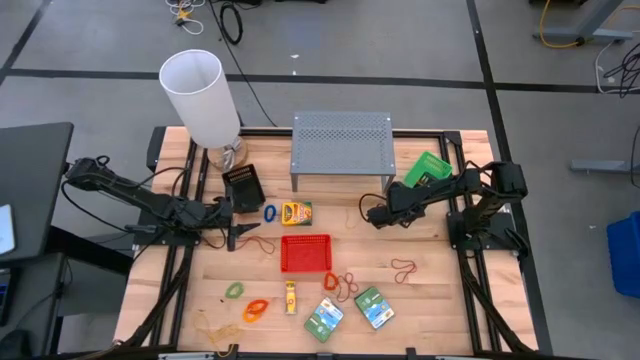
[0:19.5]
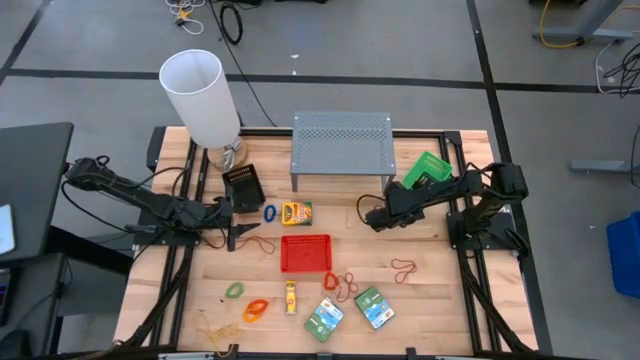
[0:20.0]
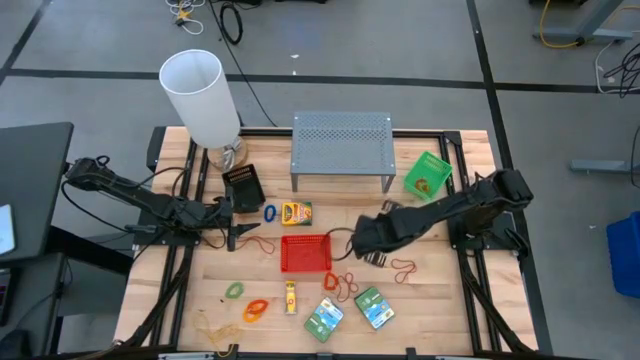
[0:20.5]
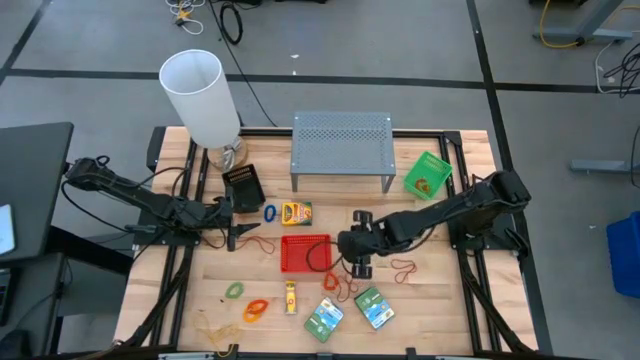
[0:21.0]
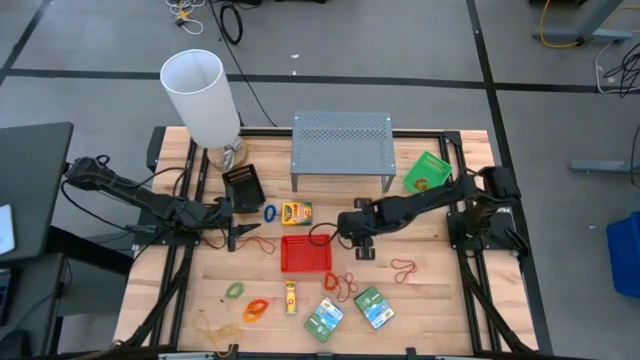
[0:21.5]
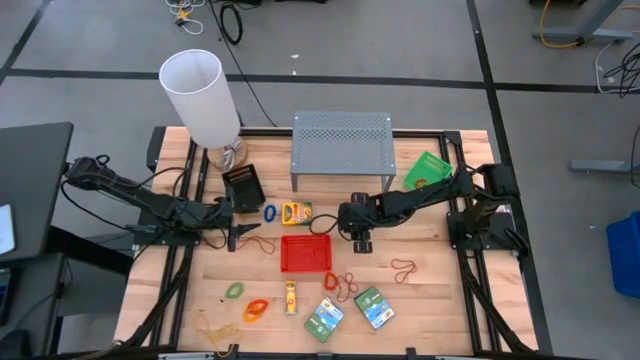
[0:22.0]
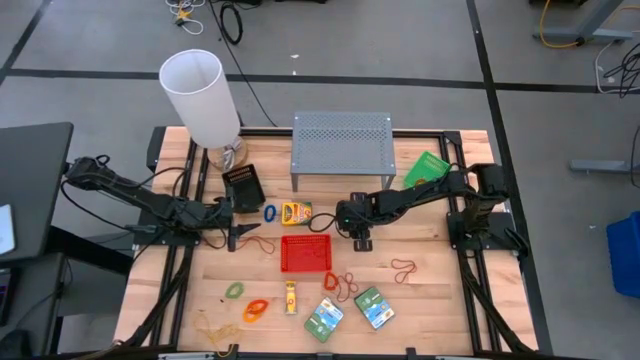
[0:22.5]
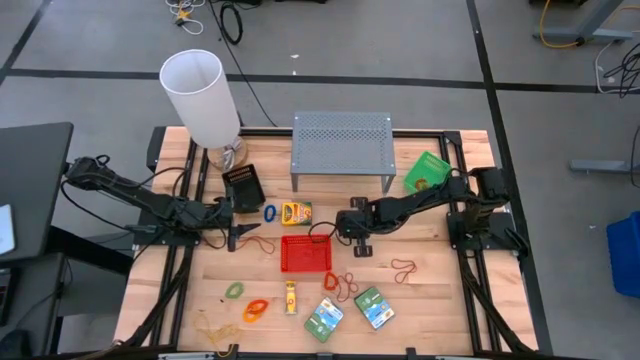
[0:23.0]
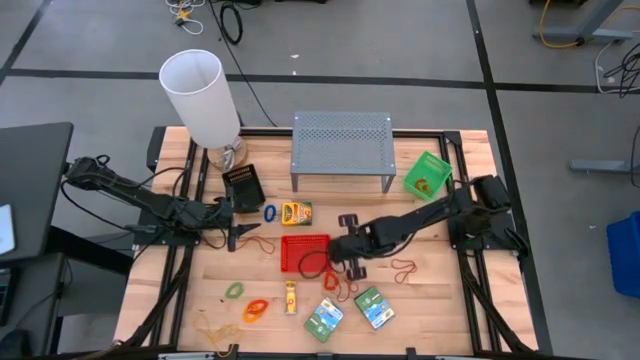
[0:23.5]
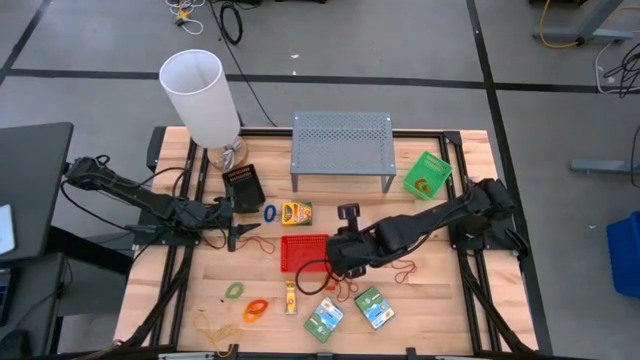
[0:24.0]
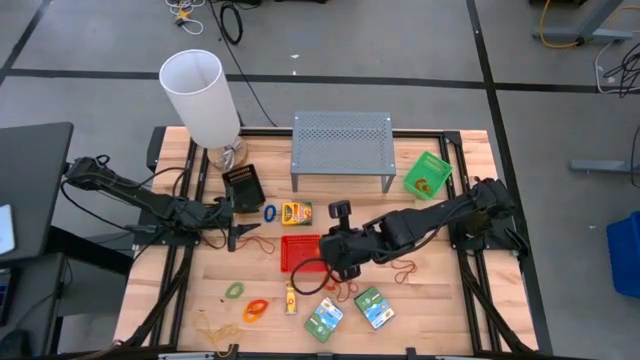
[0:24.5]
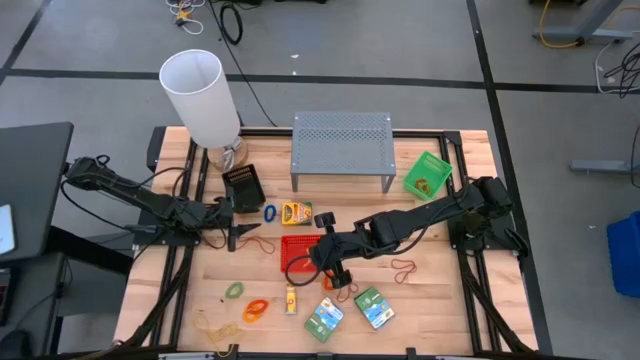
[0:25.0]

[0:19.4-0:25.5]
Task: Pick & Place Office Desk Supplies
Put the yellow rubber band into the red bin

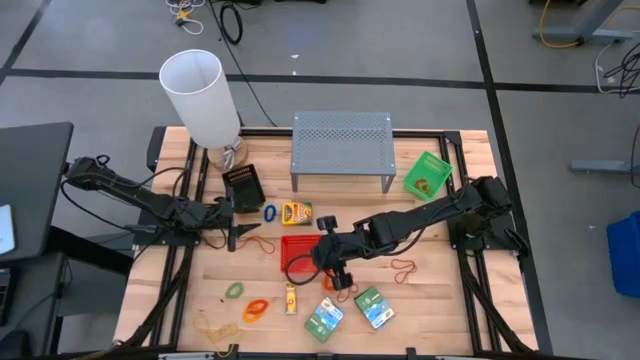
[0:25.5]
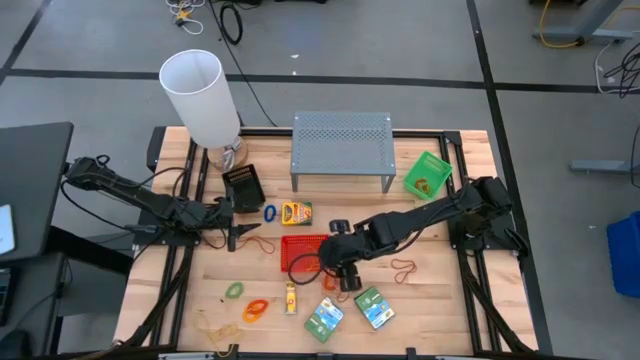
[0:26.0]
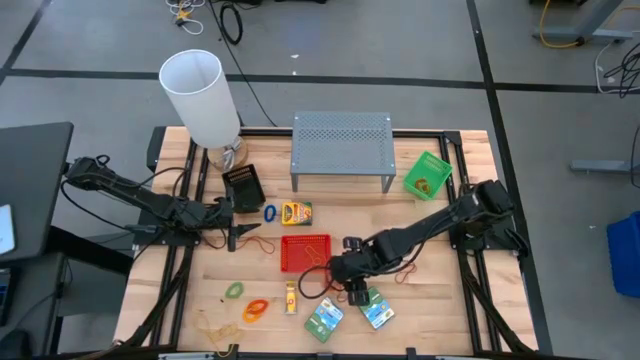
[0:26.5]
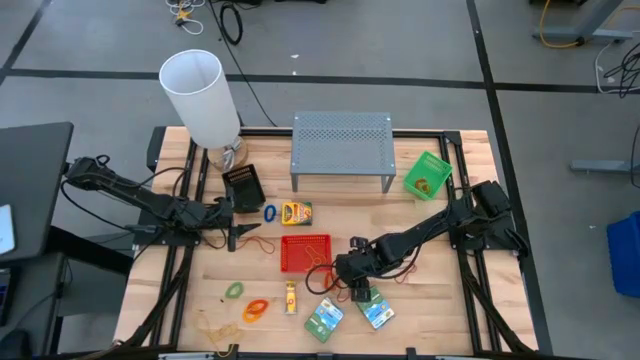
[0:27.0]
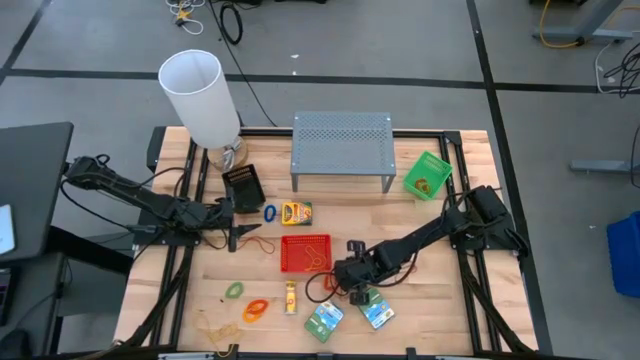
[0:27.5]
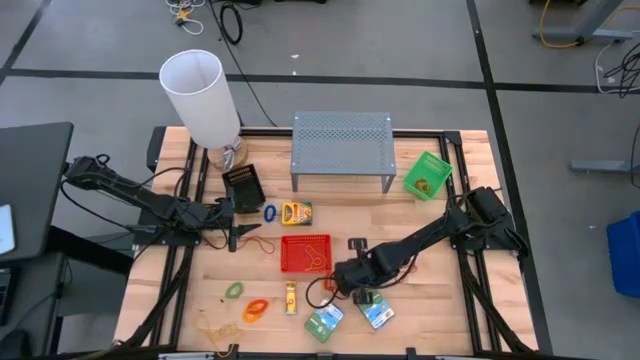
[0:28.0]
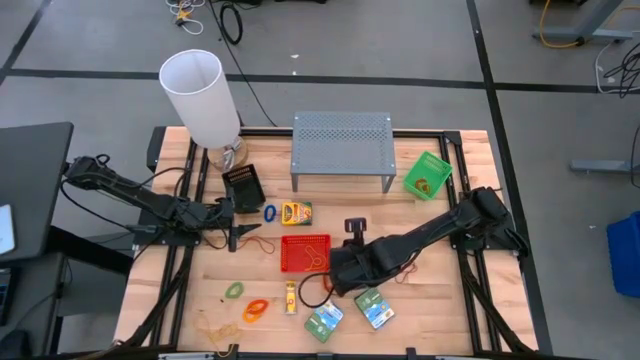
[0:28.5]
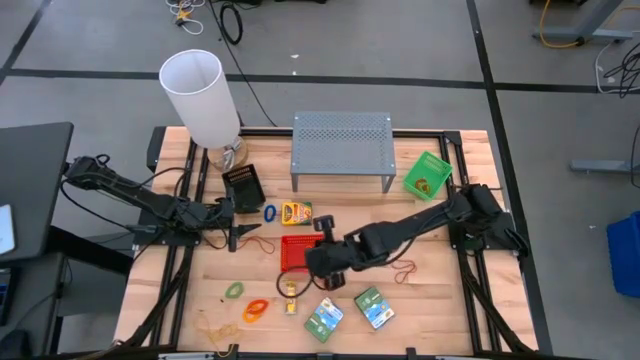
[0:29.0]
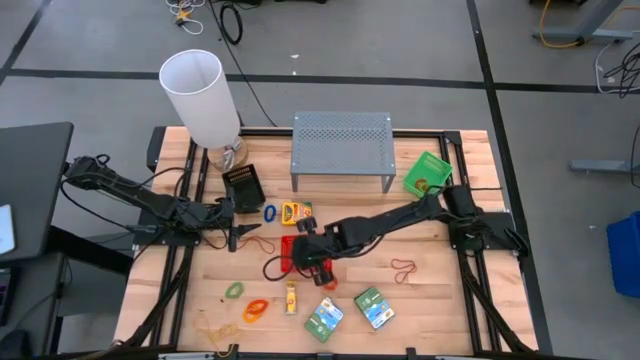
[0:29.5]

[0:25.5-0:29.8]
Put the red rubber band into the red bin

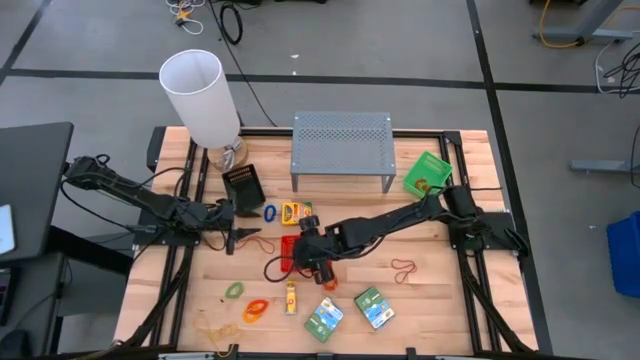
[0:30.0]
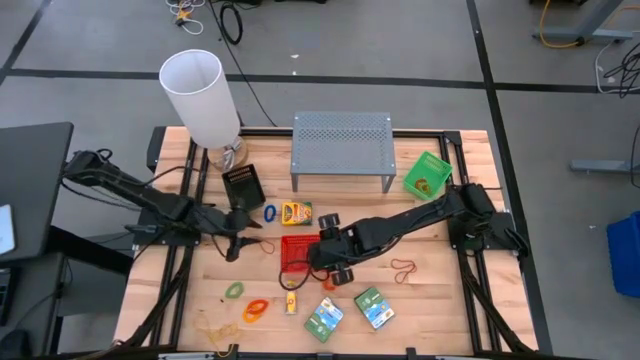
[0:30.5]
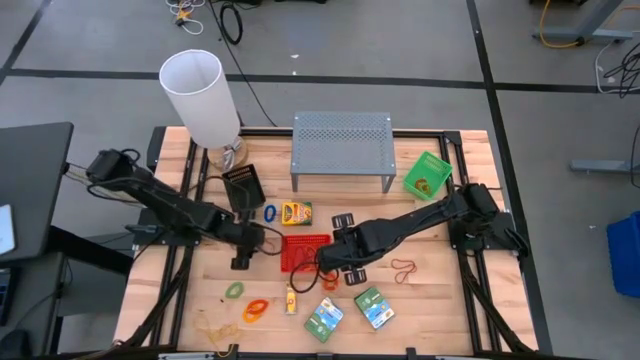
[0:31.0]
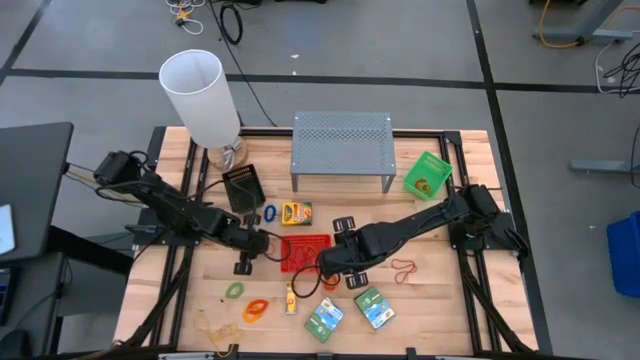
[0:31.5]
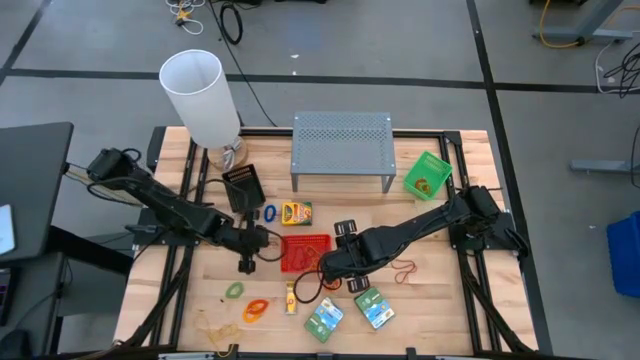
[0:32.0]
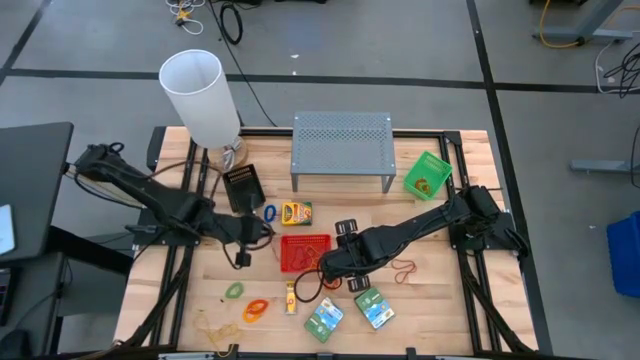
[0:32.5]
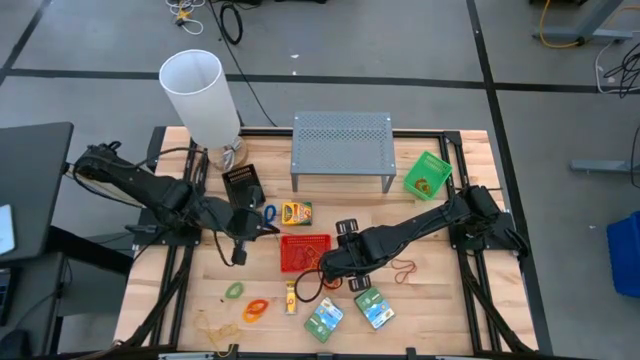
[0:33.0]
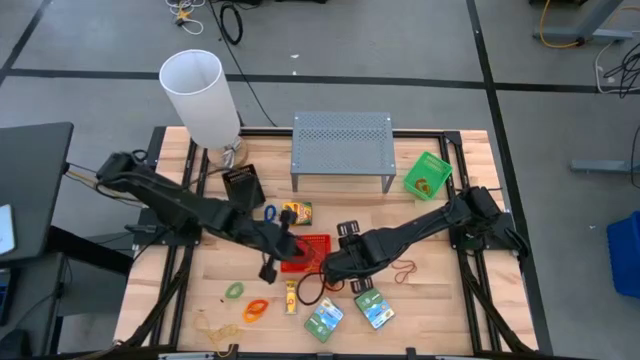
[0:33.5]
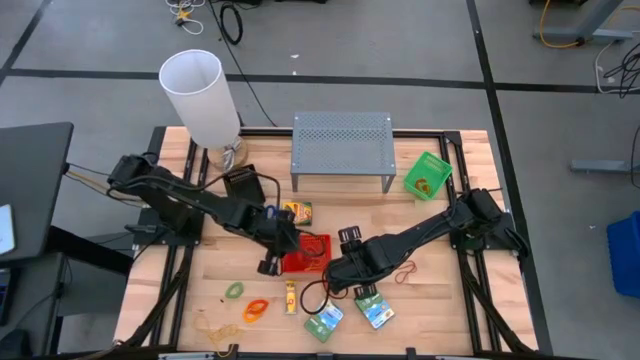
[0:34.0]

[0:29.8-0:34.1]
Put the red rubber band into the red bin

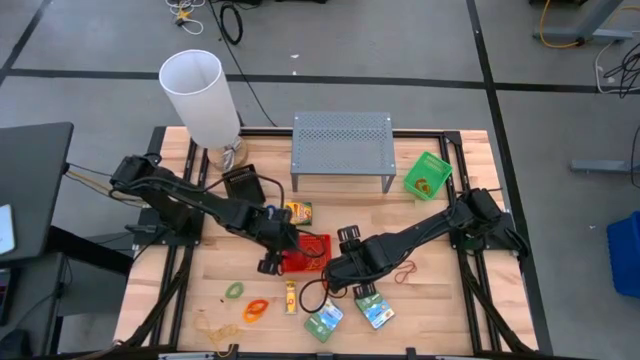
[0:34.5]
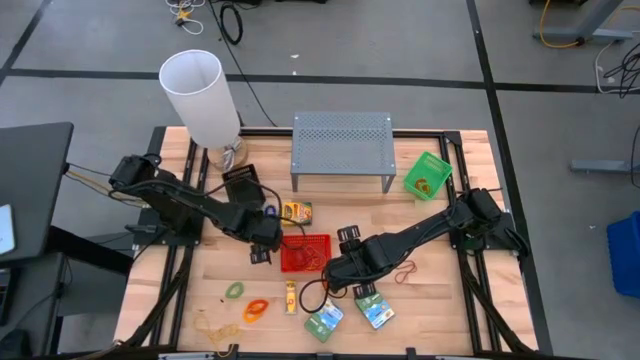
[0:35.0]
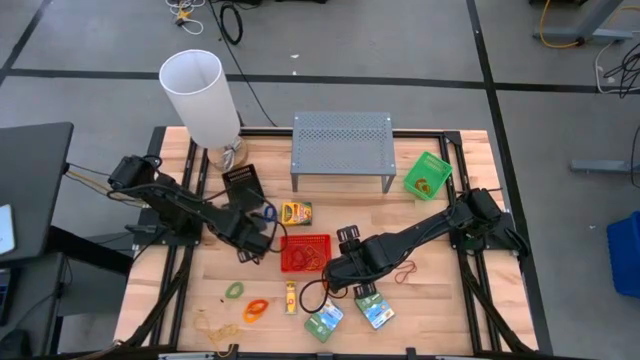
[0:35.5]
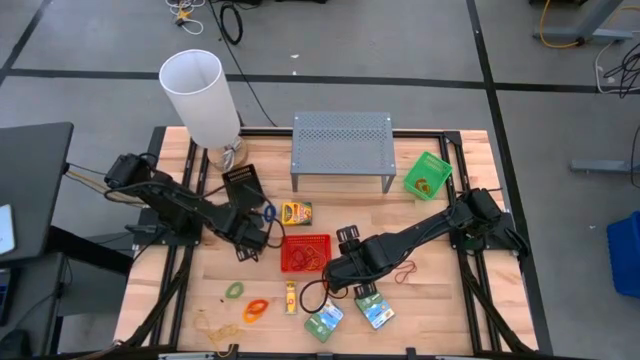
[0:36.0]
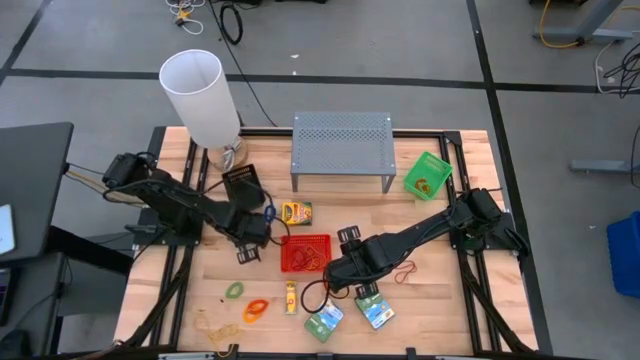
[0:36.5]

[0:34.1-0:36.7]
Put the yellow rubber band into the red bin

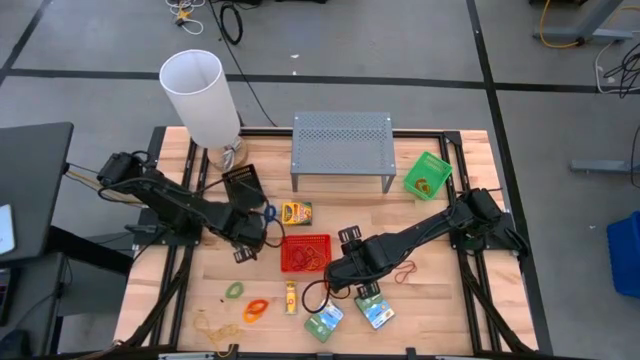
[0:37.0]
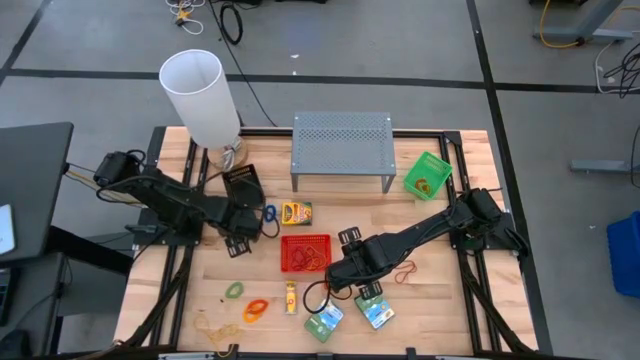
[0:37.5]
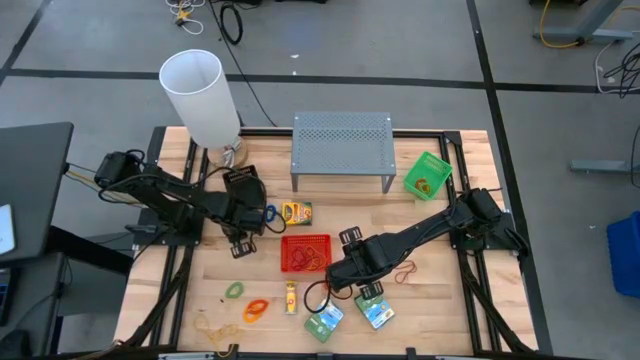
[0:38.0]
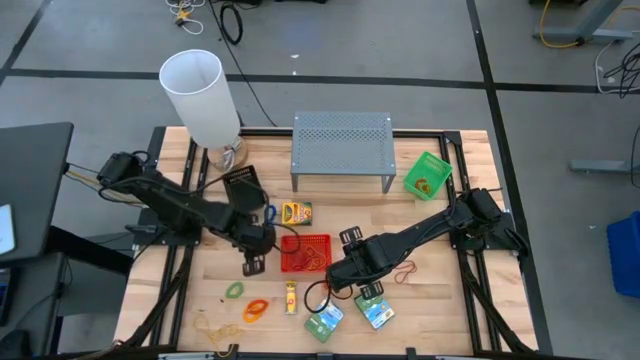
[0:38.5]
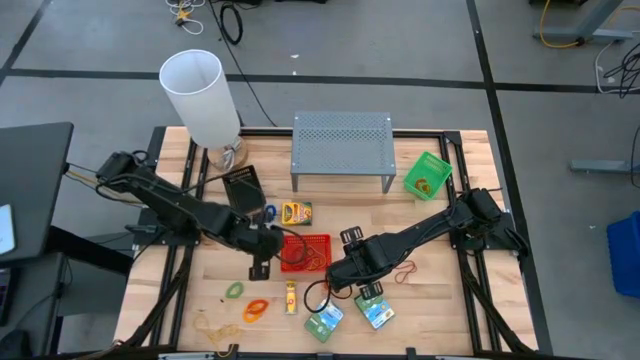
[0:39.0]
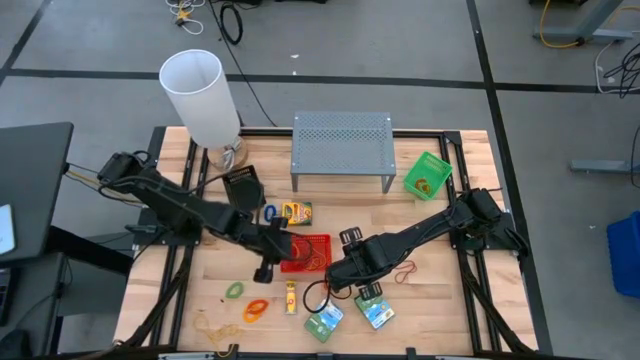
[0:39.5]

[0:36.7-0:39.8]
Put the orange rubber band into the red bin

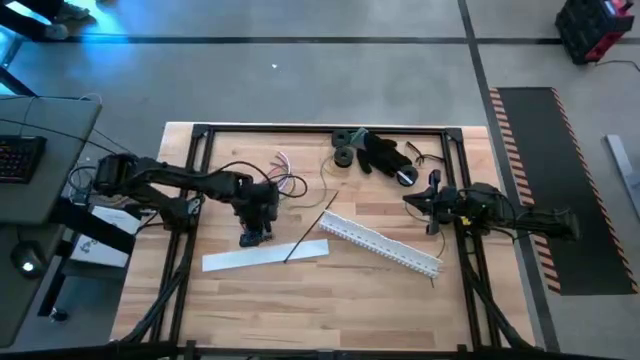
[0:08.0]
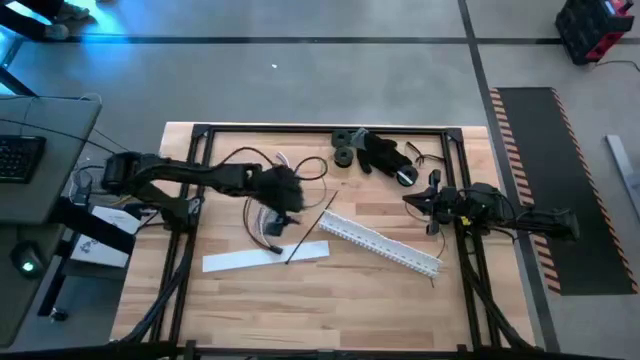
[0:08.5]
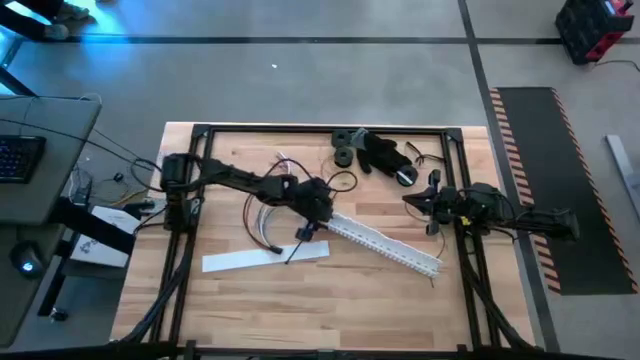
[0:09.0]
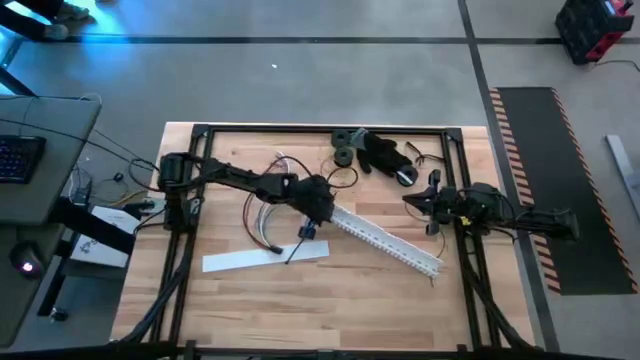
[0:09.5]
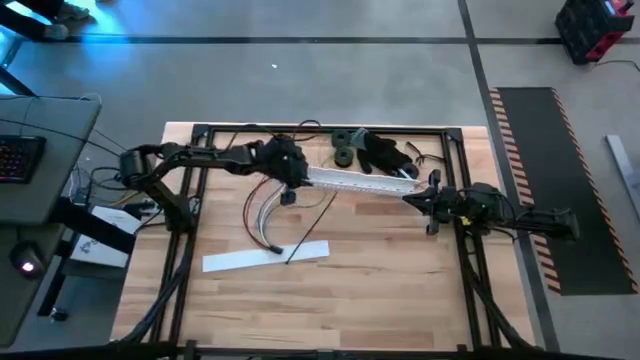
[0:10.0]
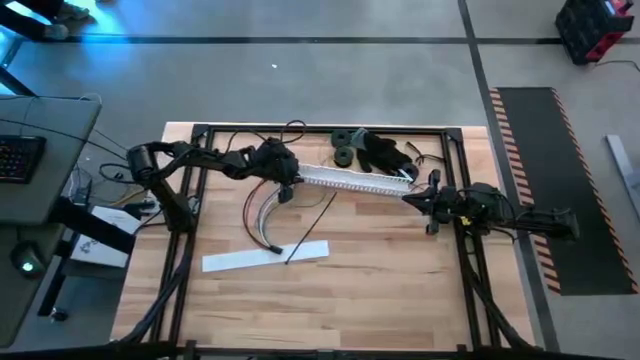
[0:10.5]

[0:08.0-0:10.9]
Task: Ziptie cables
Adjust the white cable duct
